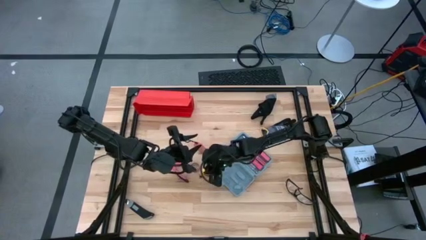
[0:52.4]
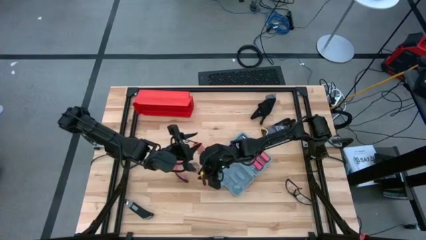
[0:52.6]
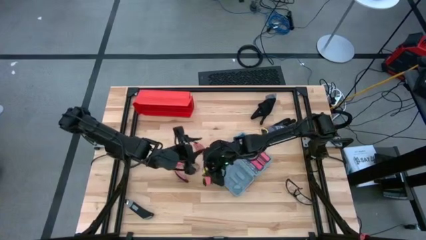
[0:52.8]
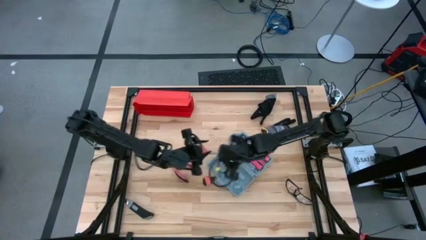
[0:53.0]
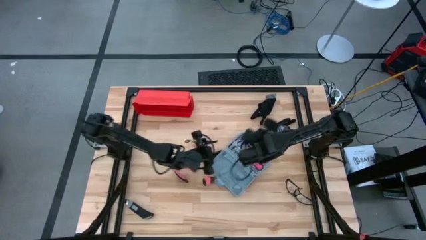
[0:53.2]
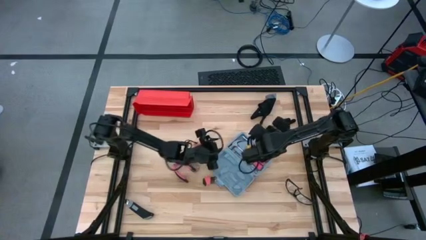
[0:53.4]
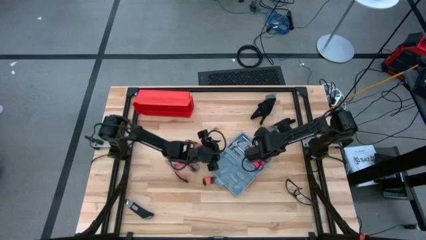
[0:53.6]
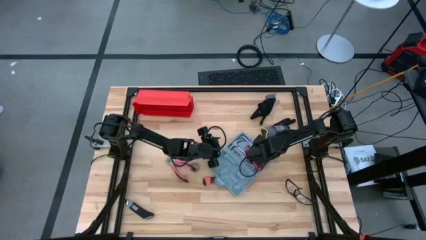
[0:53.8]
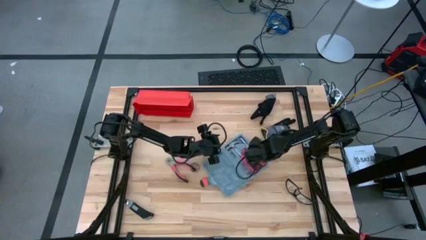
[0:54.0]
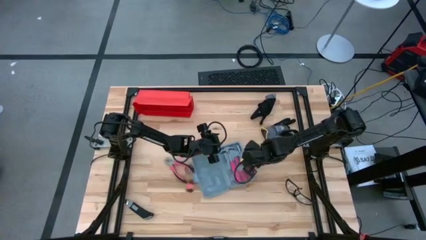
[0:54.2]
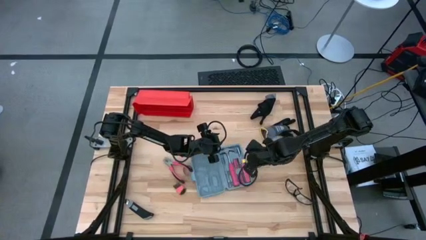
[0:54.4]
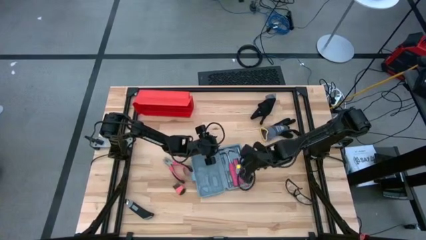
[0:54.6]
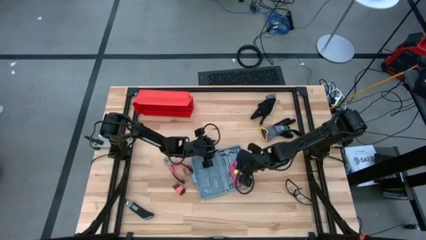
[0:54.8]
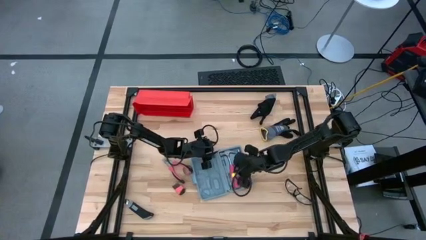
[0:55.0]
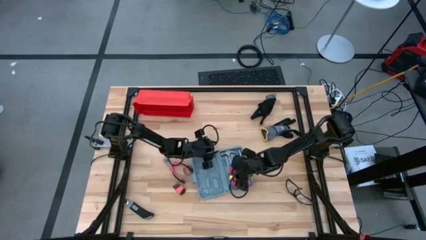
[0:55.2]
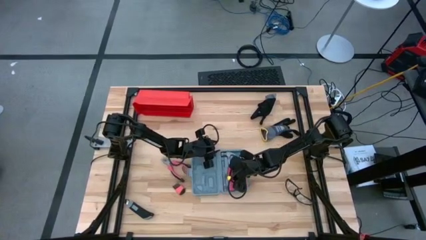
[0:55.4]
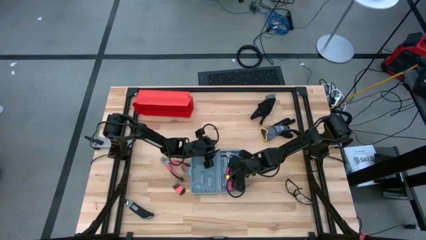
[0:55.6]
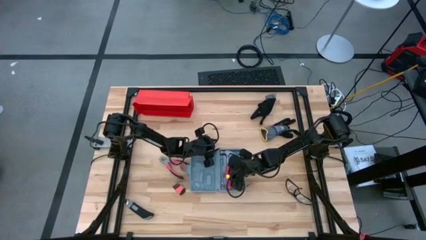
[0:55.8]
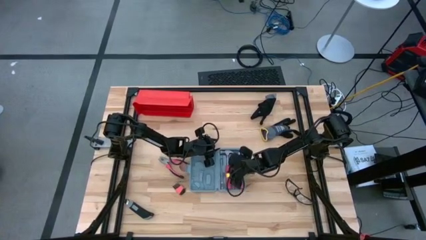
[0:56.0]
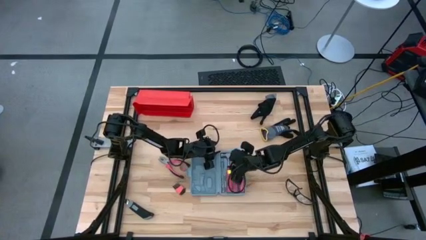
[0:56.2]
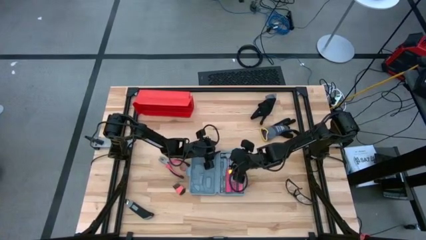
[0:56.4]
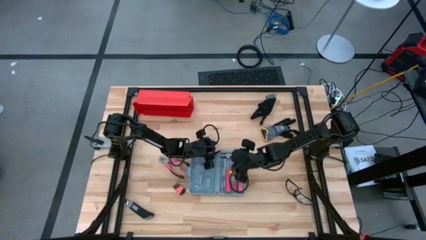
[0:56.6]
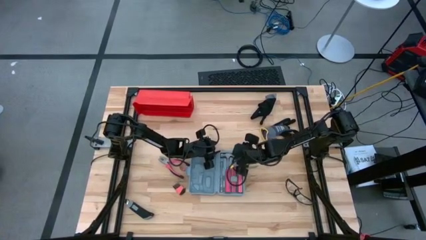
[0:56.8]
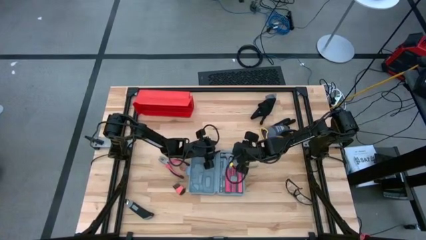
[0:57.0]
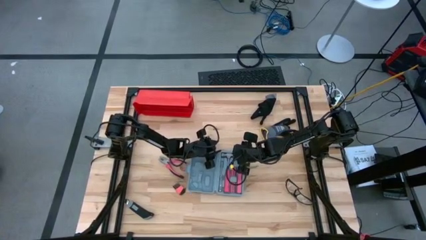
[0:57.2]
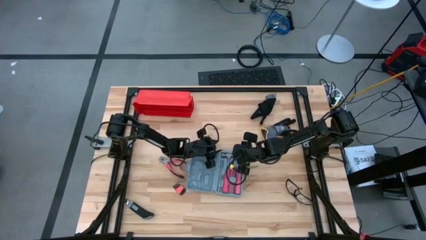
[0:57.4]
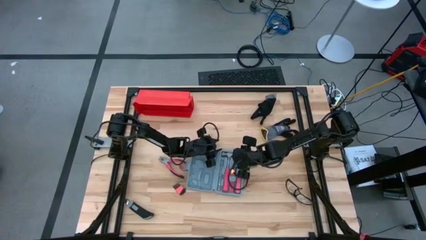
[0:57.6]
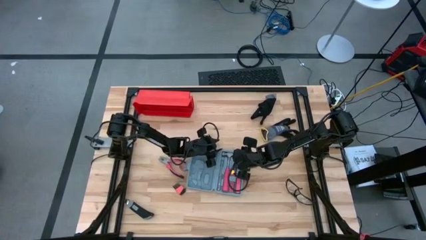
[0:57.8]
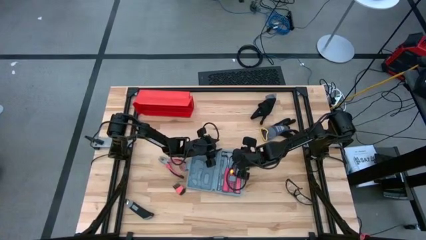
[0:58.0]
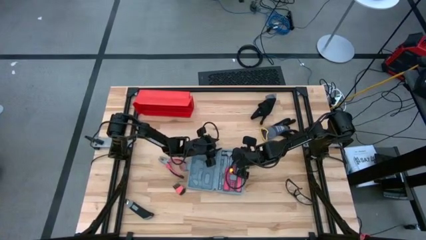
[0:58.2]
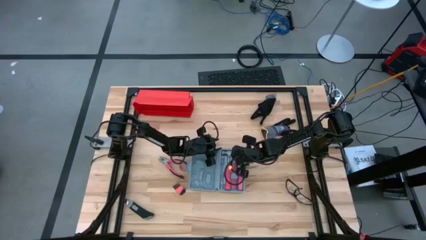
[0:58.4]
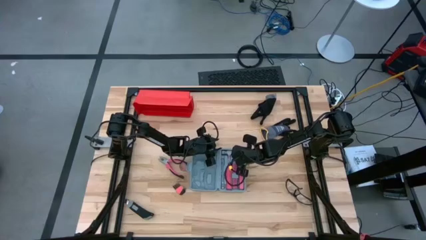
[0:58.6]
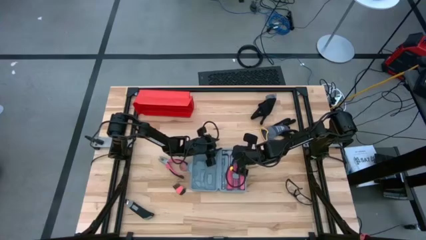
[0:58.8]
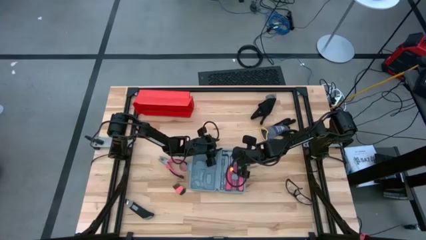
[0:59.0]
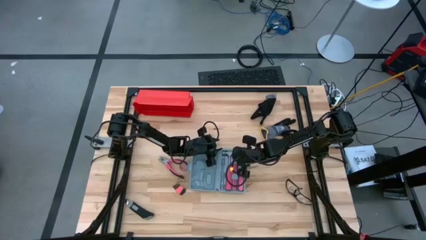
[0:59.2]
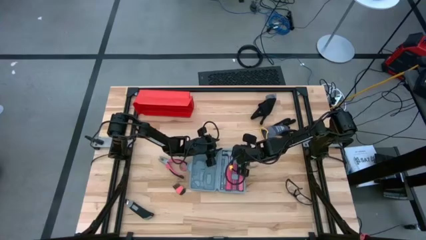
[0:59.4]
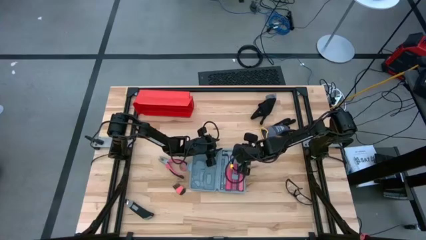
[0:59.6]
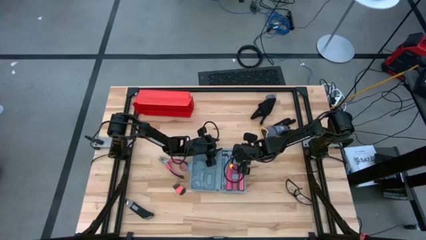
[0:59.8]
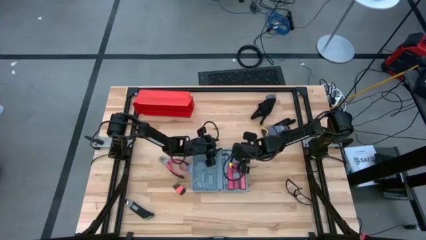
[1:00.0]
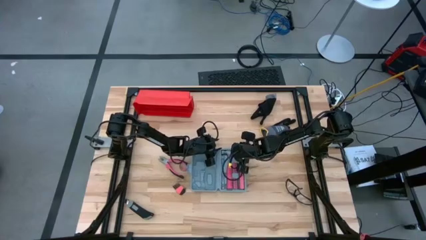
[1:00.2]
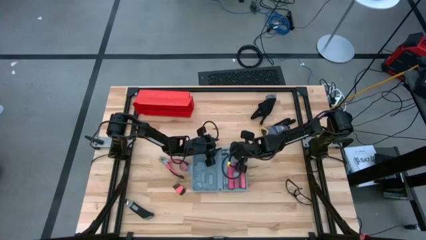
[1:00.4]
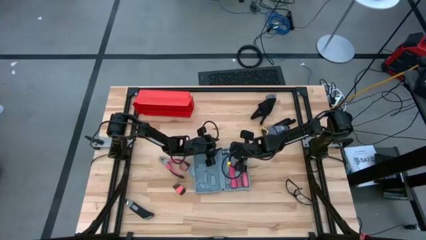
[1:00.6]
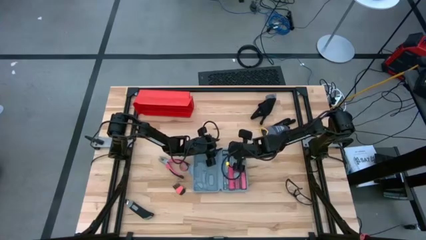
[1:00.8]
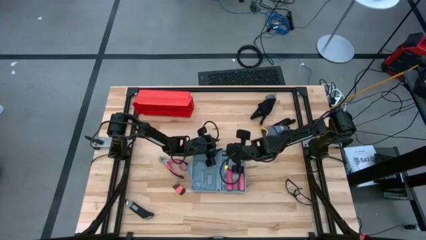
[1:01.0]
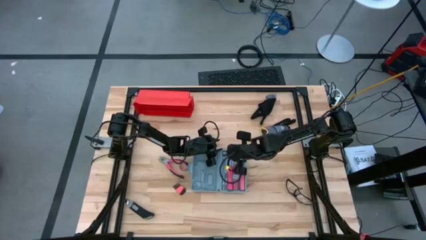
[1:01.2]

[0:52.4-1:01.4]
Task: prefit tool cases
Remove the orange hammer from the gray pre-fit tool case

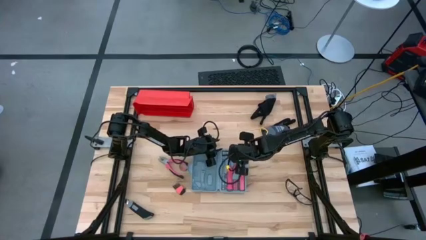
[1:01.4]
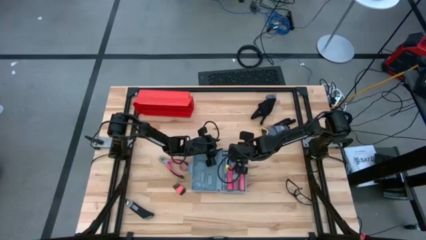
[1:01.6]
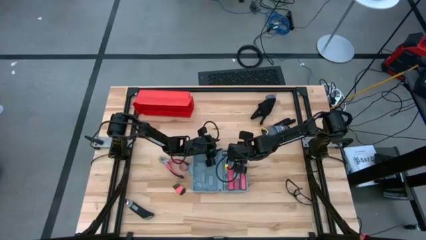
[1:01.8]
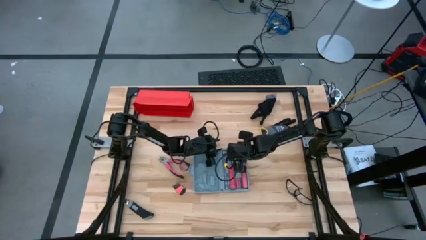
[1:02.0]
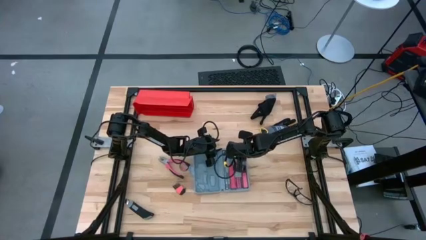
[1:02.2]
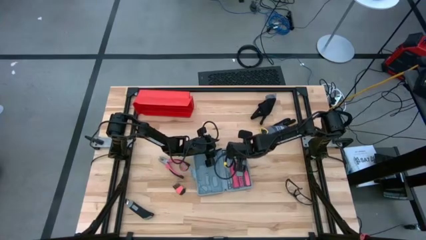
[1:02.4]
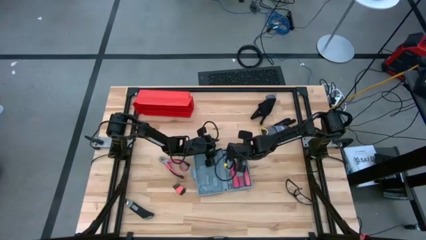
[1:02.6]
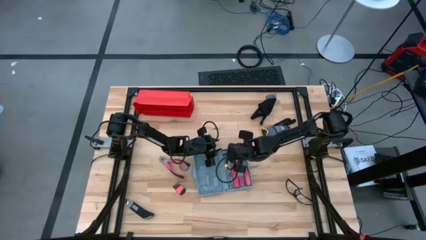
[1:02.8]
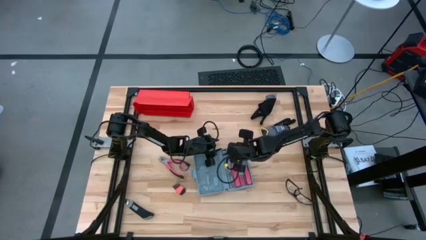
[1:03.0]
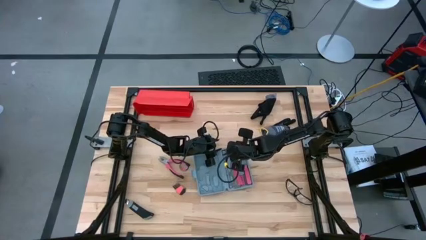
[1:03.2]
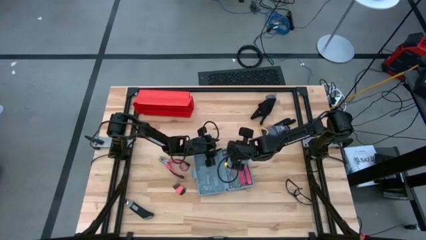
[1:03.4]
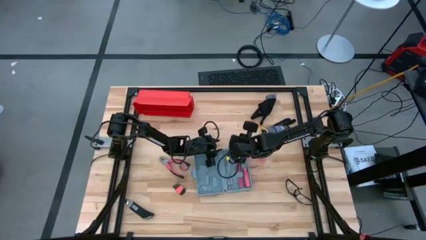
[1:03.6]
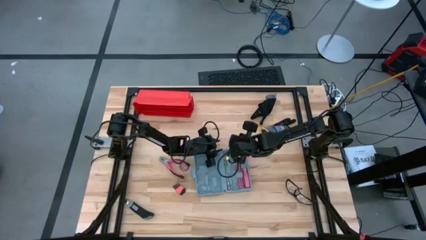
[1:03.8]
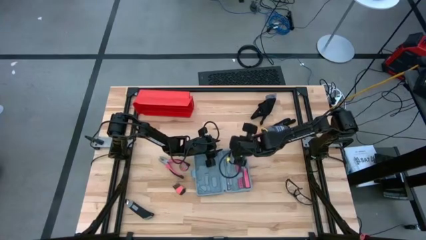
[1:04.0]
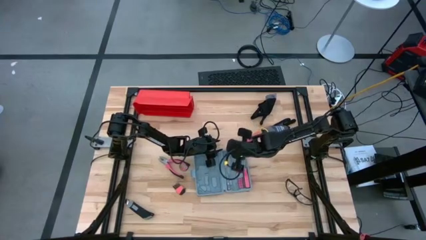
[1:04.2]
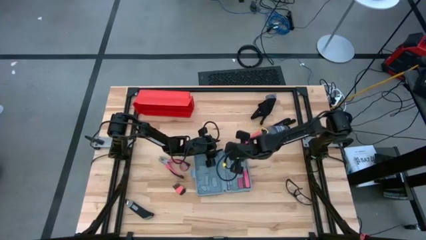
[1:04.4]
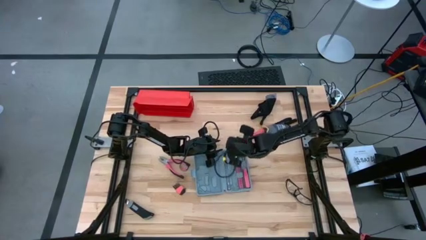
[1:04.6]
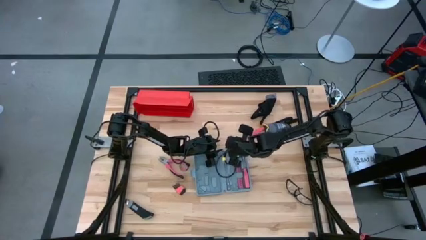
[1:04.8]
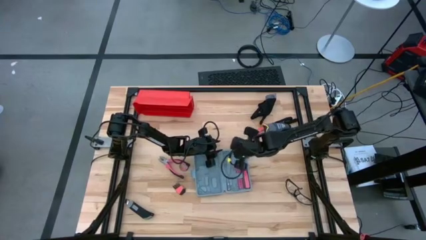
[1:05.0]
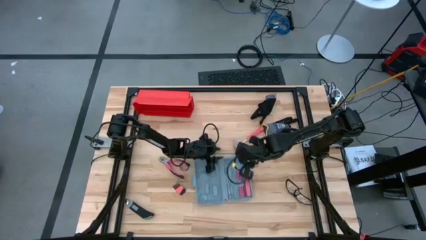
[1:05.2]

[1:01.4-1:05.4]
Remove the orange hammer from the gray pre-fit tool case

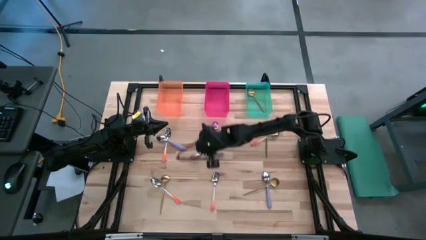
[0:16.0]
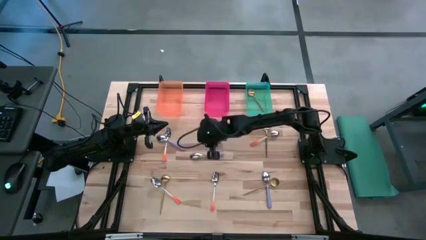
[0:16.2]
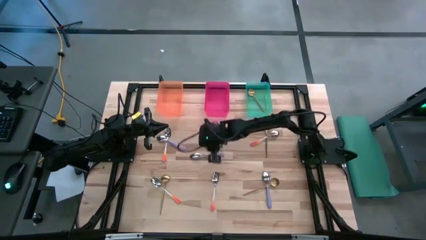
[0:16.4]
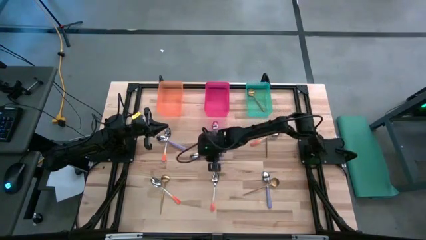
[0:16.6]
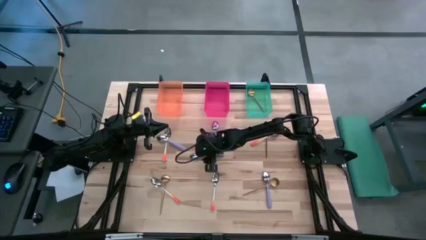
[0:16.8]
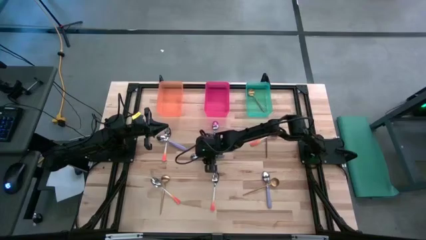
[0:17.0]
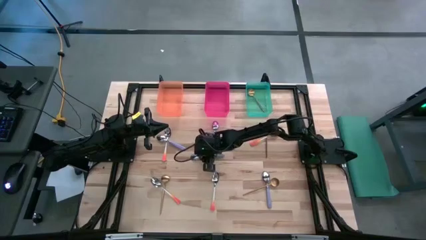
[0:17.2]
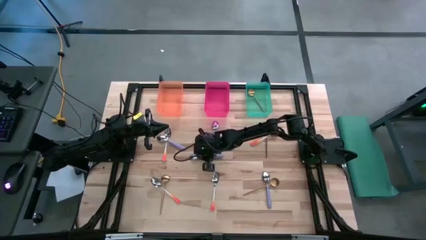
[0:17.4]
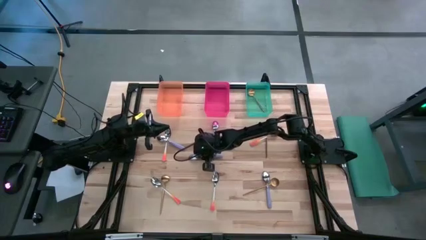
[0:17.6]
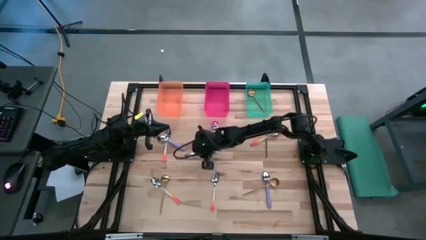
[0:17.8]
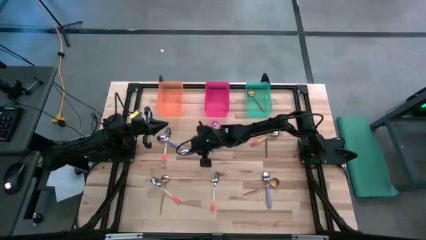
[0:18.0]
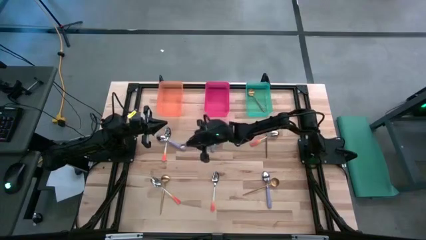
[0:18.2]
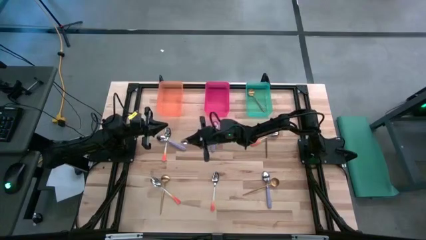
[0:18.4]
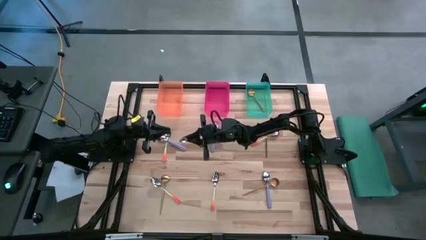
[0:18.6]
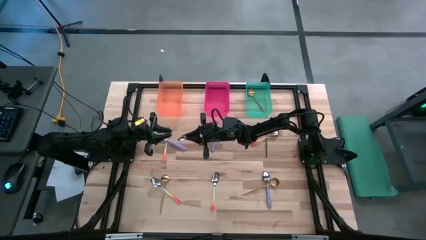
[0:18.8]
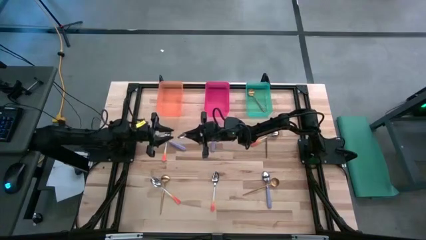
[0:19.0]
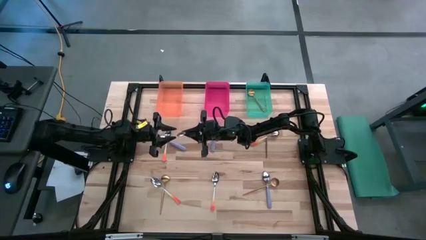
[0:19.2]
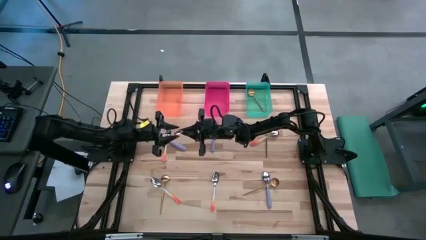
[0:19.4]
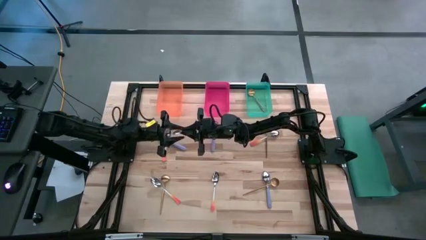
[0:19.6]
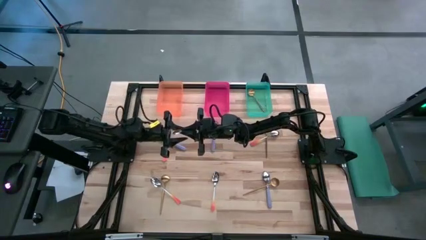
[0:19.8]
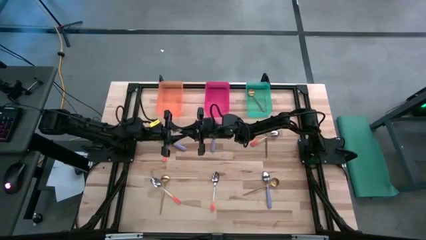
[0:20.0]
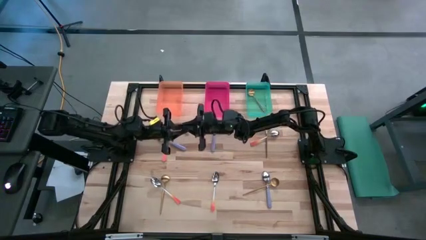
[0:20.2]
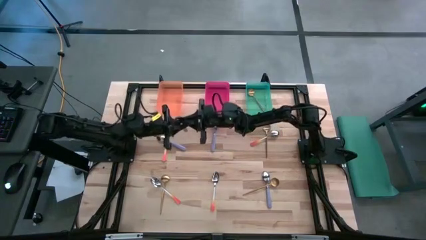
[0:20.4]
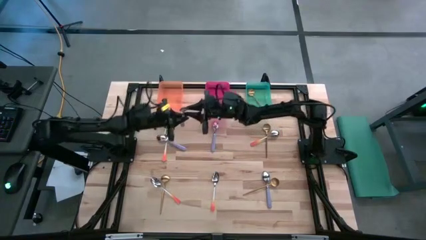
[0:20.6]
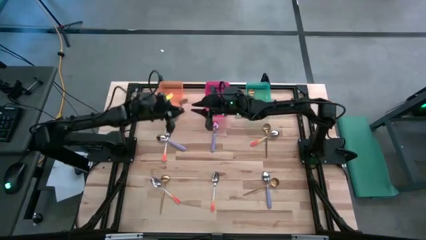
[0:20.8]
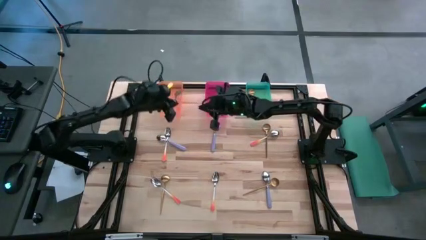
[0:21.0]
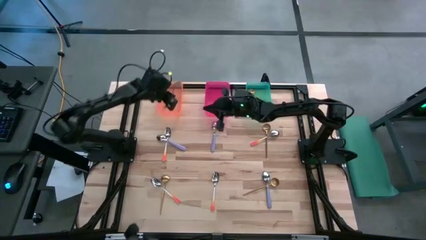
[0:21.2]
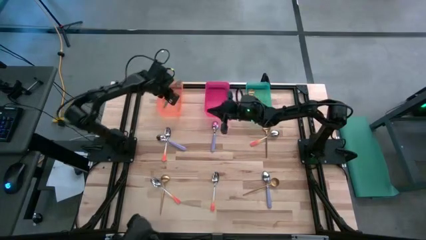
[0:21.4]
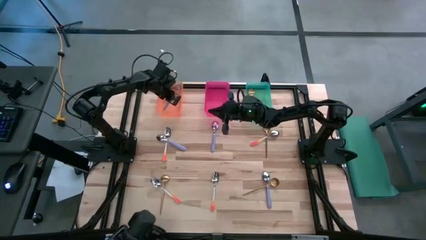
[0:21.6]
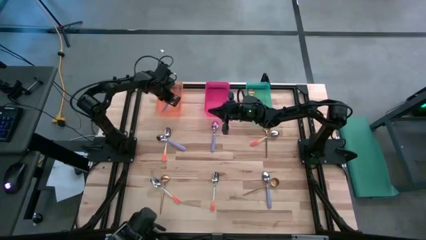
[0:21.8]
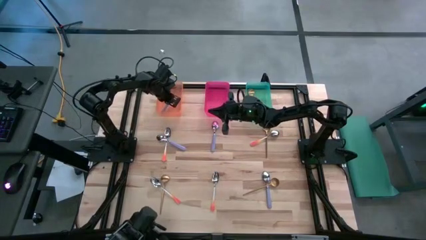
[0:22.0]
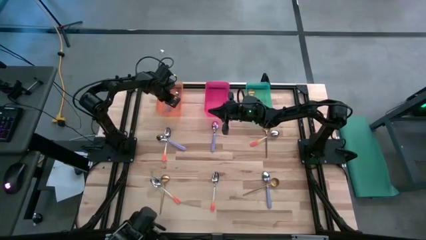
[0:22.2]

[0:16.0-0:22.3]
Task: Sort silverware by color (type)
Put the purple spoon into the orange bin
